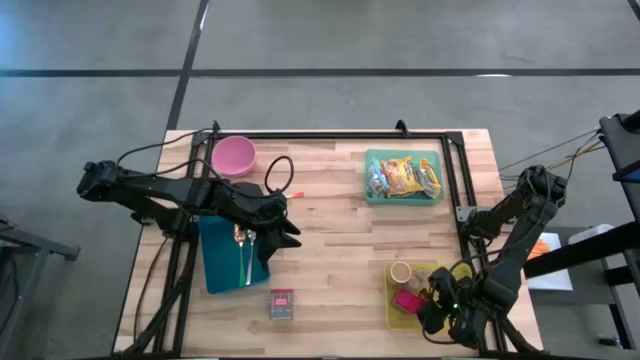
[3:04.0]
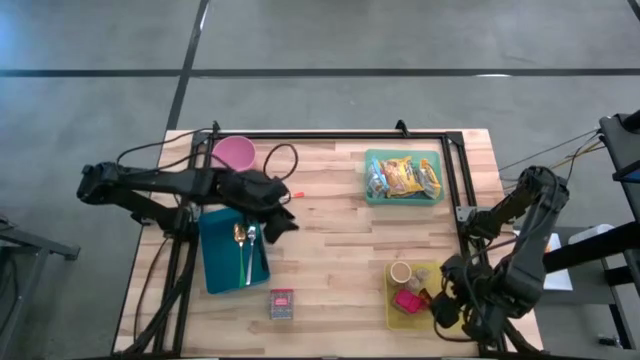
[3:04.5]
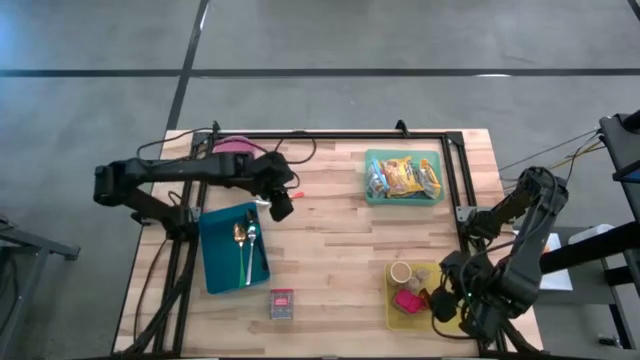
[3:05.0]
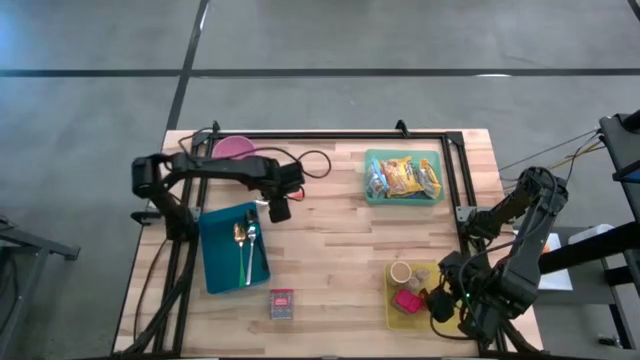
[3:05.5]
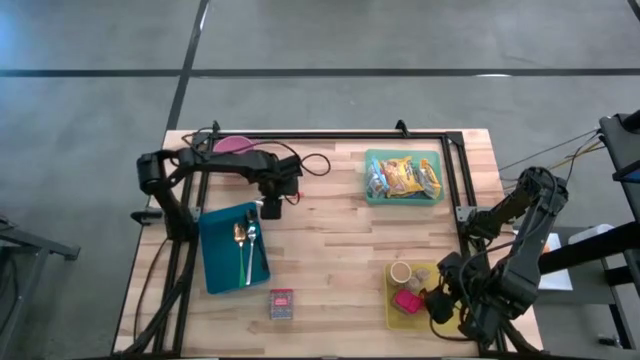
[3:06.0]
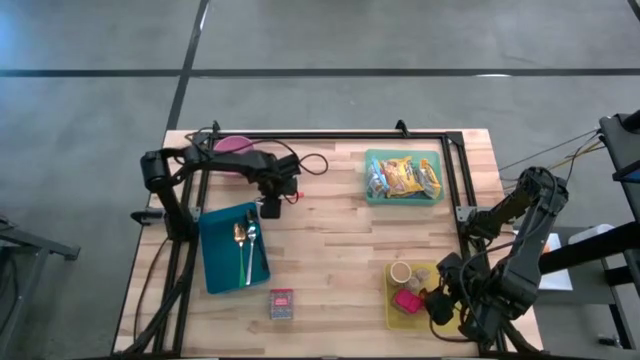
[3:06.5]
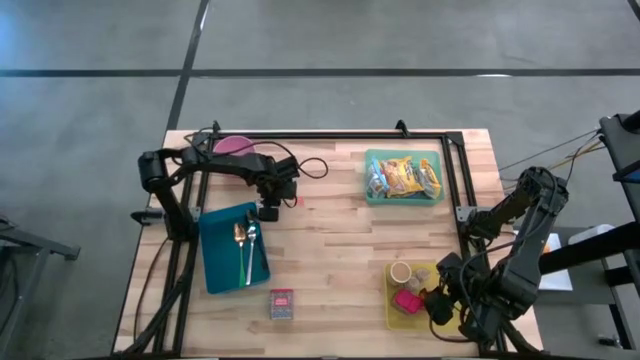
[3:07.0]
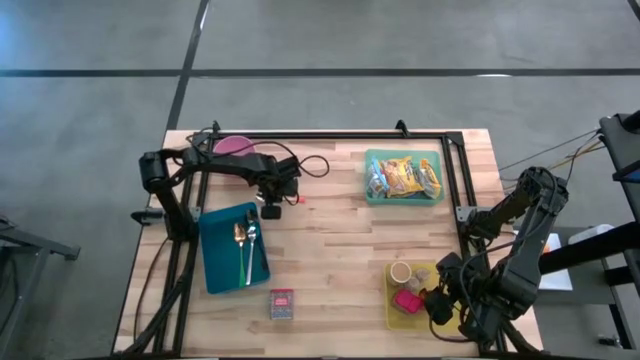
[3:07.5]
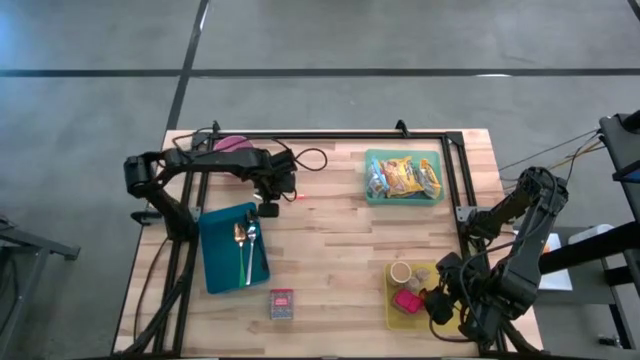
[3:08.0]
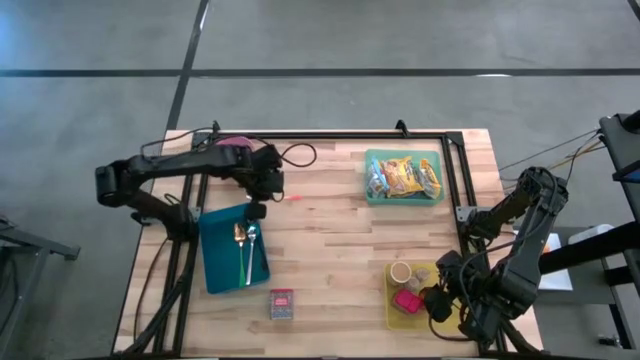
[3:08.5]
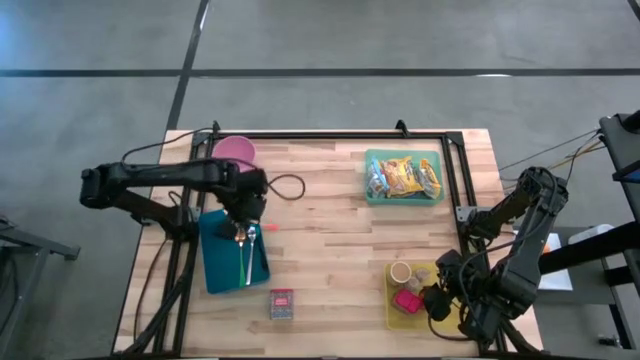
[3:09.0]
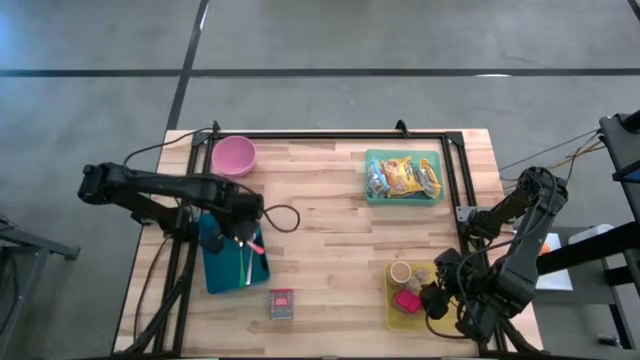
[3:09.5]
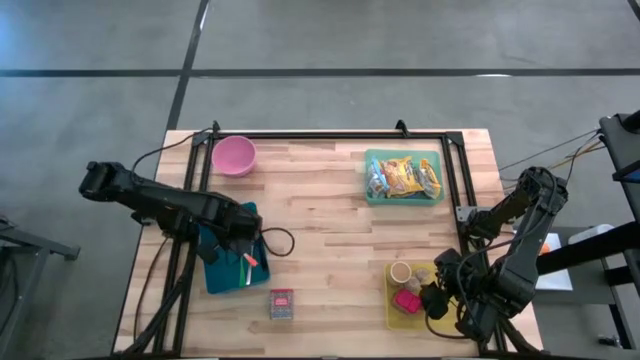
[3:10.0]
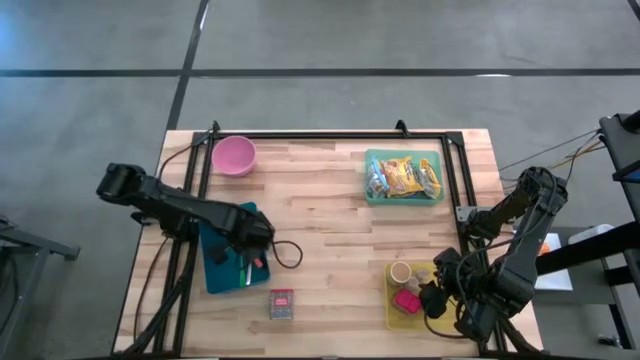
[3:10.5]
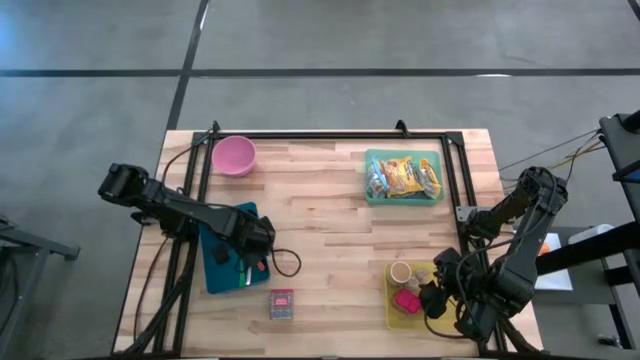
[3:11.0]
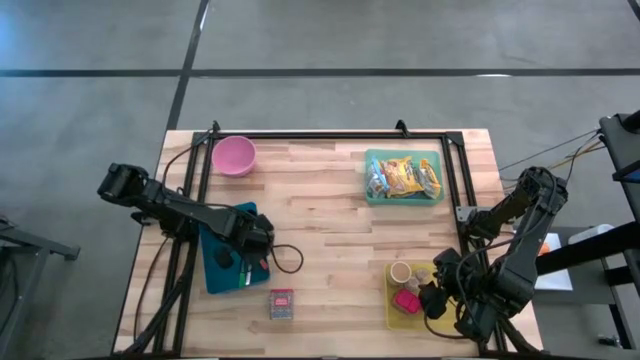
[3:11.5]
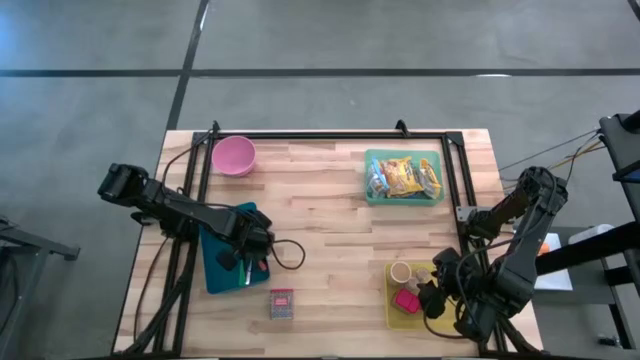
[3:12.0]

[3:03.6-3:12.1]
Put the orange spoon into the blue bin

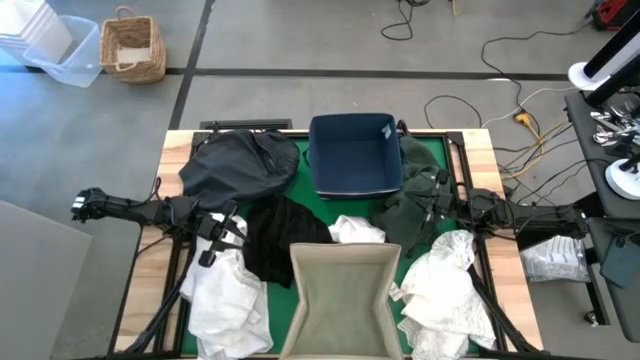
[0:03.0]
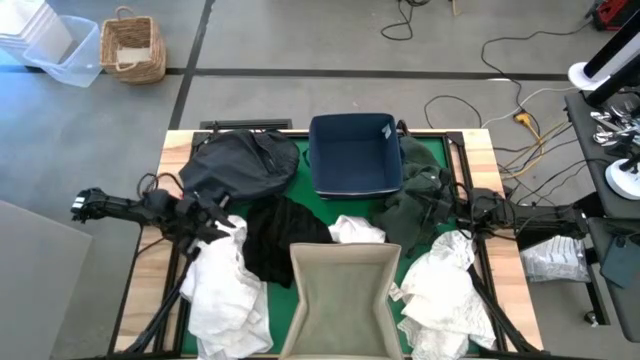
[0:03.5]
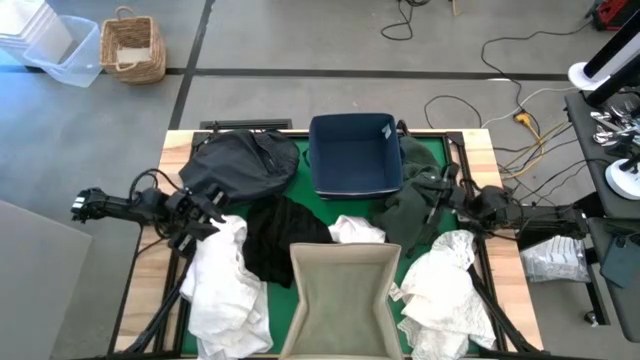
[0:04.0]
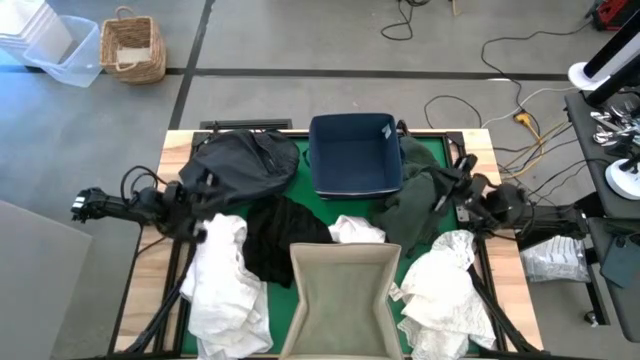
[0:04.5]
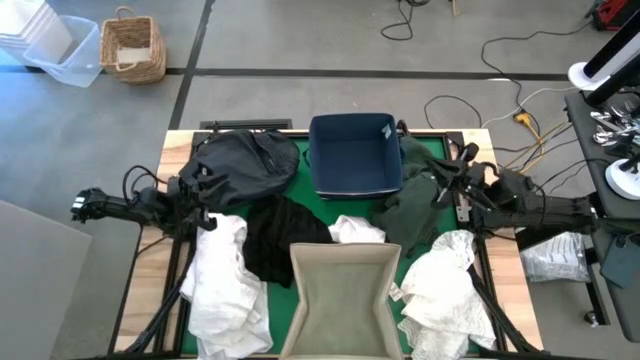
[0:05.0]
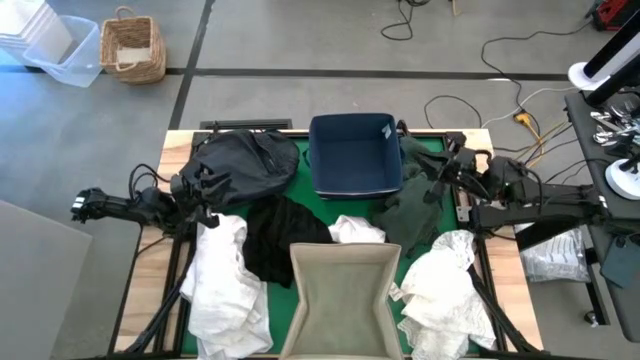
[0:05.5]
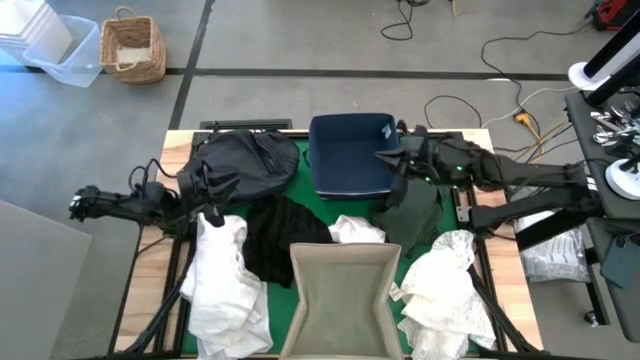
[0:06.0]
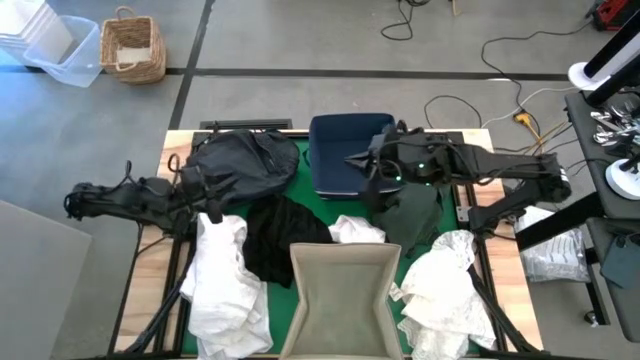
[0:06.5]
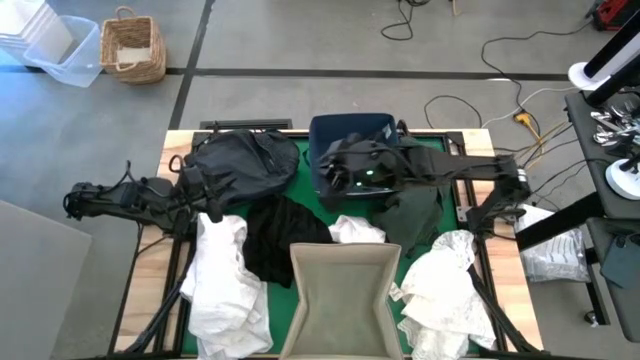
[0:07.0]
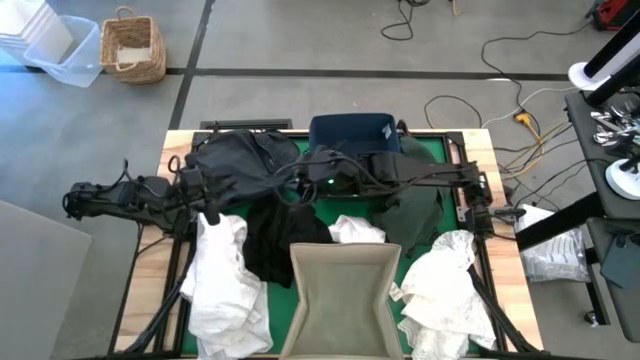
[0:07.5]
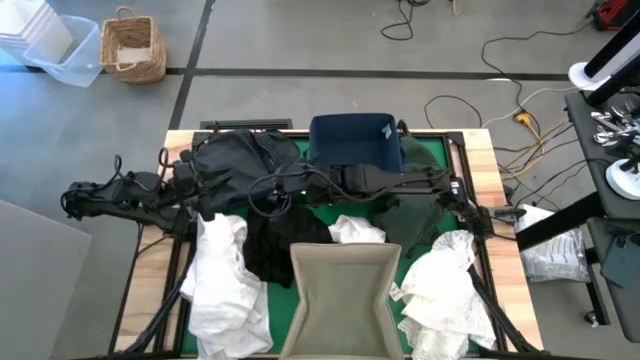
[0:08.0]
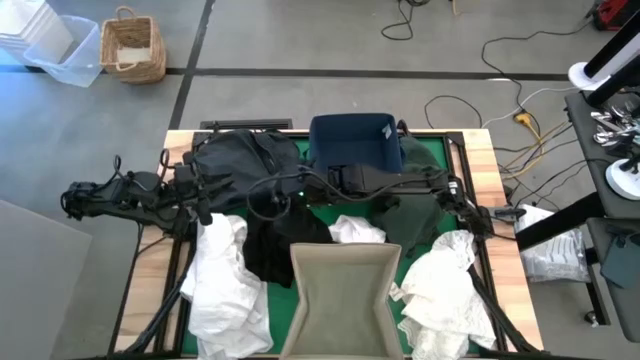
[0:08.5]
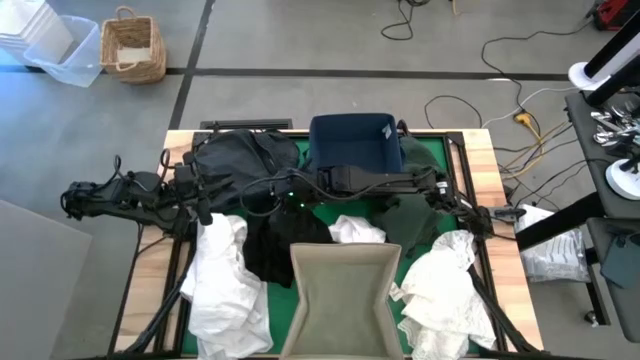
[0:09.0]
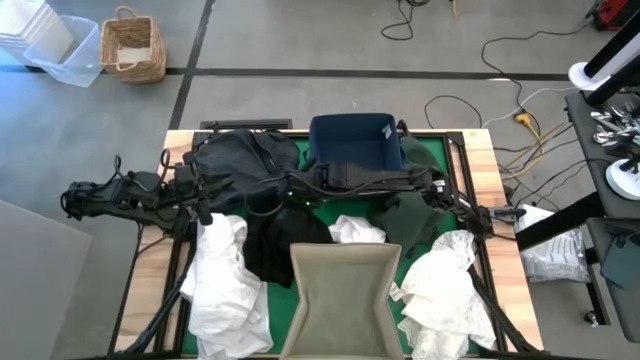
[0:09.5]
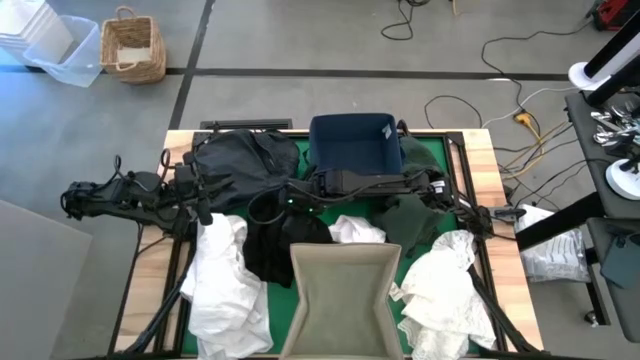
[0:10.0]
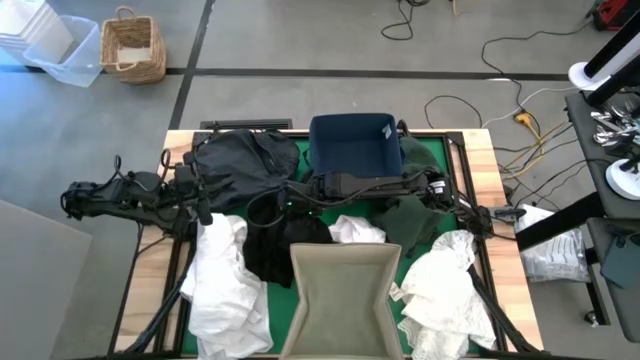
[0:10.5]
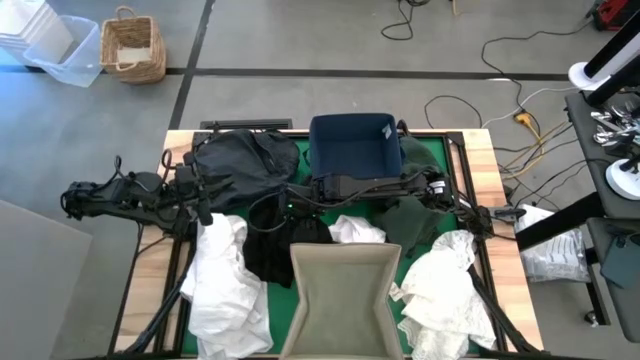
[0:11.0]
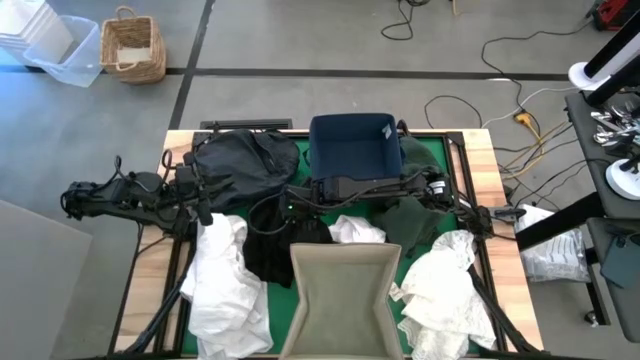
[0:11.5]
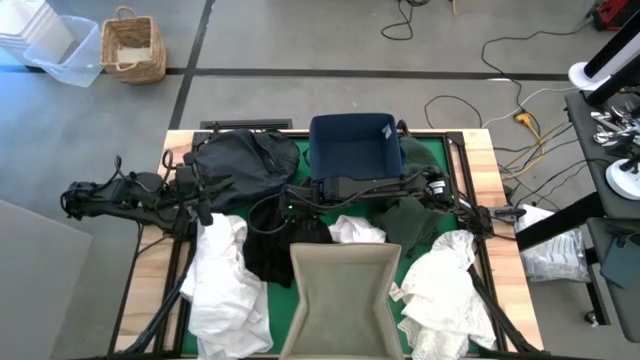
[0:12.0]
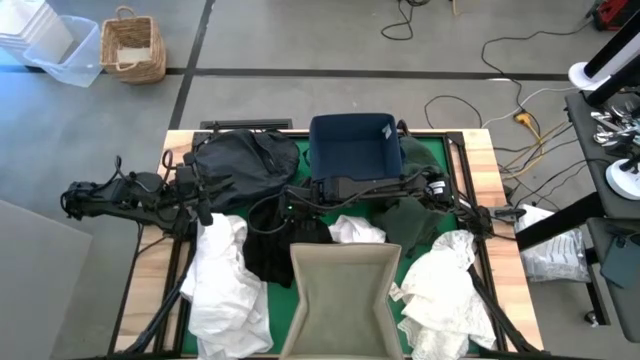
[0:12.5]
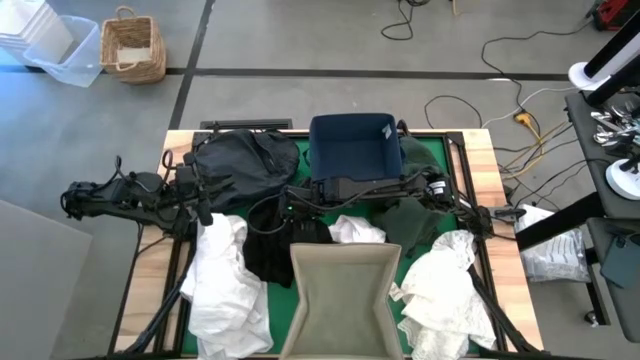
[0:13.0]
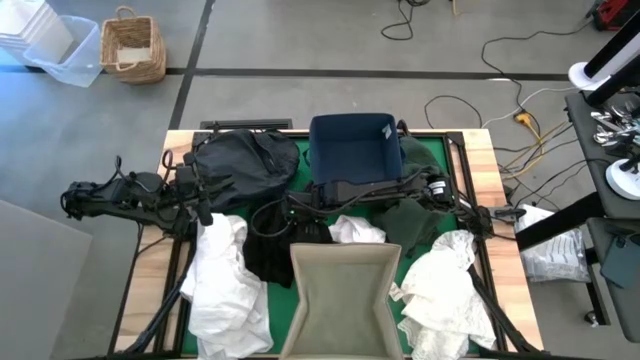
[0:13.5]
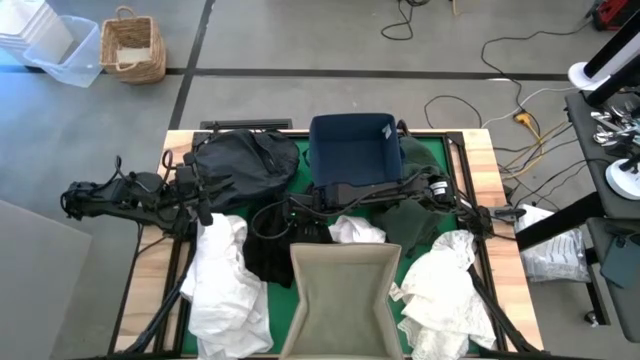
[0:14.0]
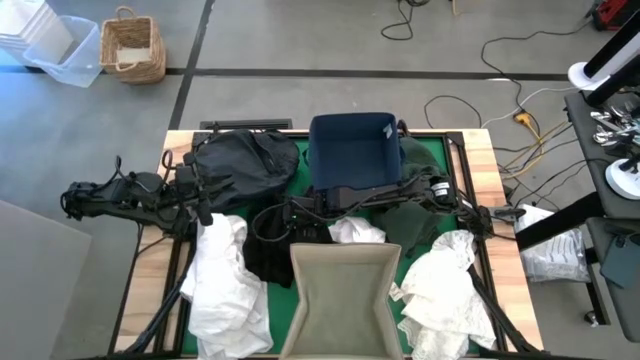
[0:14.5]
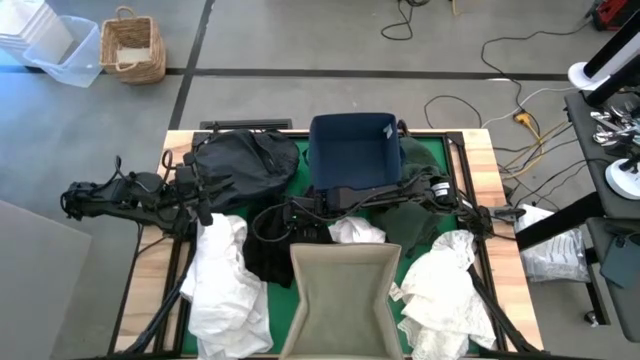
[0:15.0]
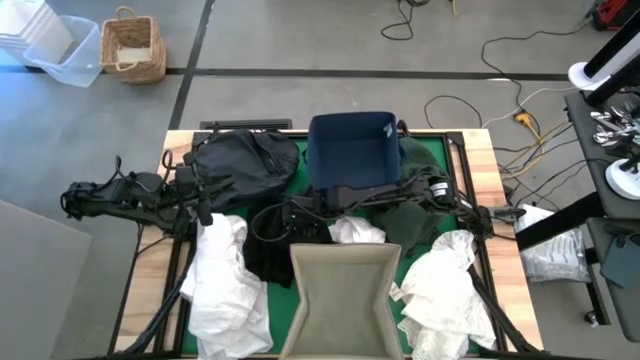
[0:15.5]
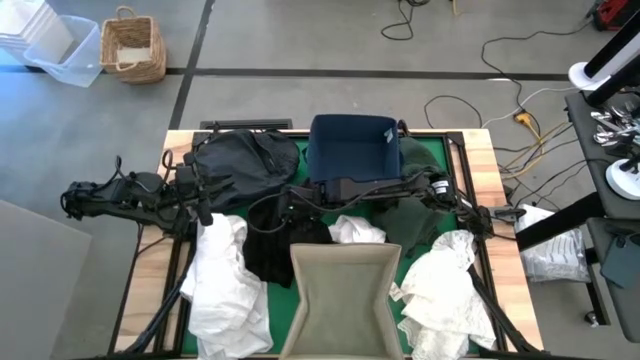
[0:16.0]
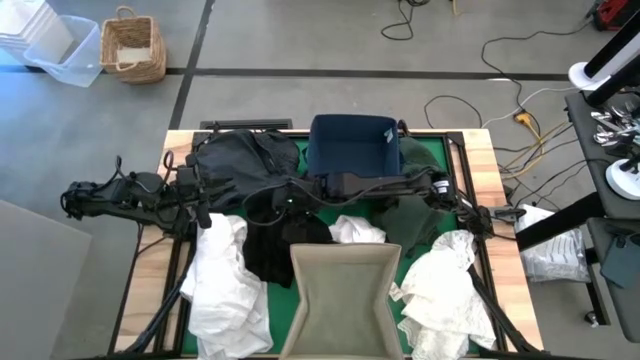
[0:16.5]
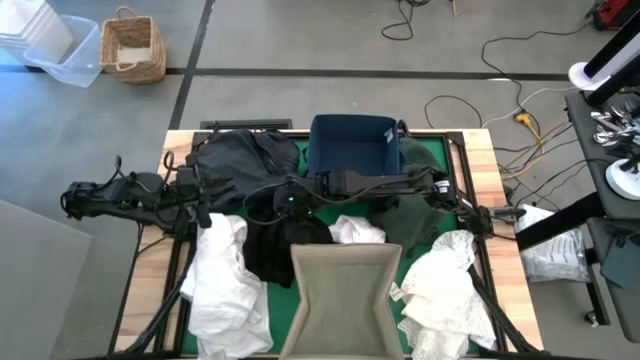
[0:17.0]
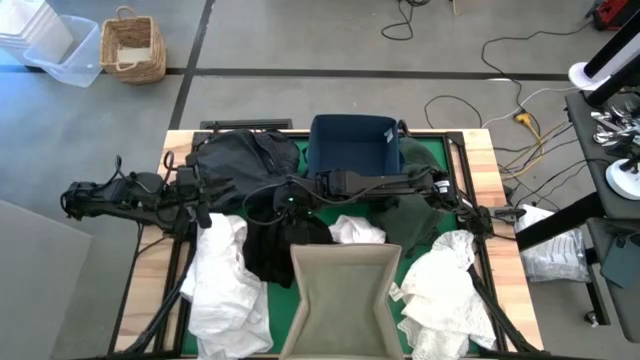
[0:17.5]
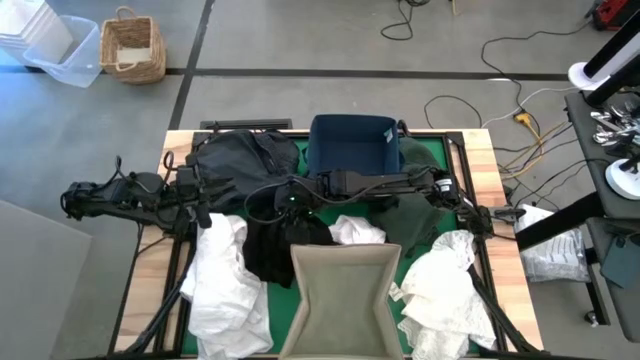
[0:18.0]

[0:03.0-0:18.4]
Put the black shirt into the white laundry bin
